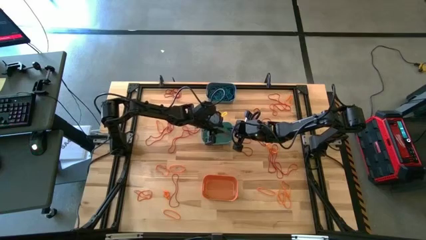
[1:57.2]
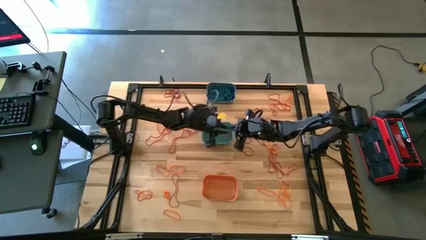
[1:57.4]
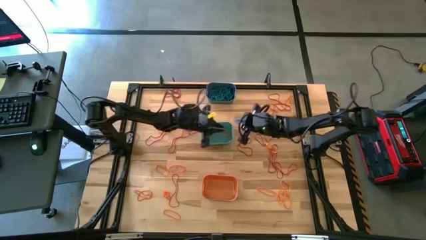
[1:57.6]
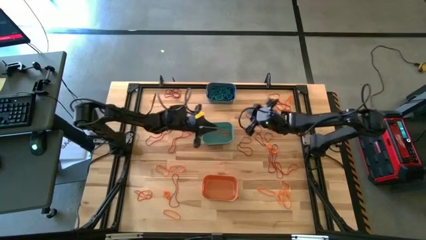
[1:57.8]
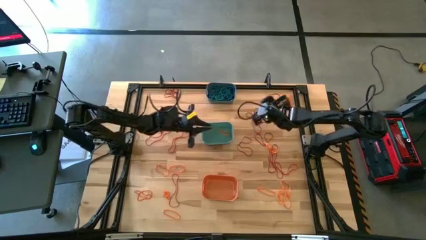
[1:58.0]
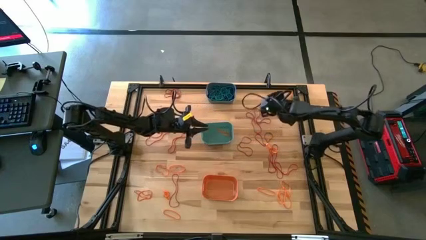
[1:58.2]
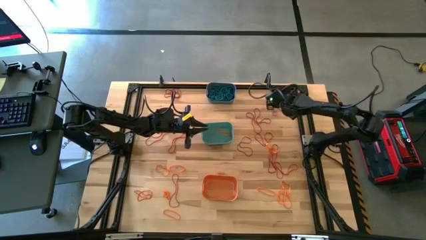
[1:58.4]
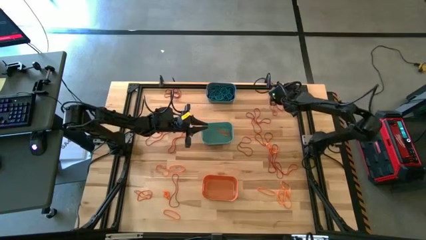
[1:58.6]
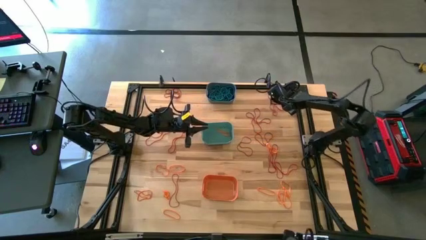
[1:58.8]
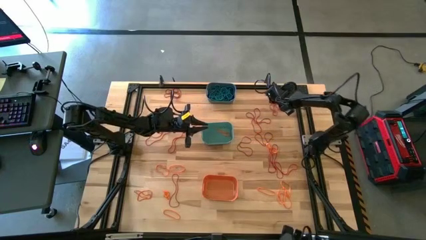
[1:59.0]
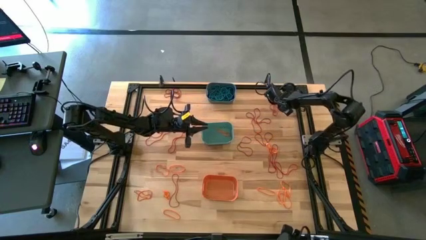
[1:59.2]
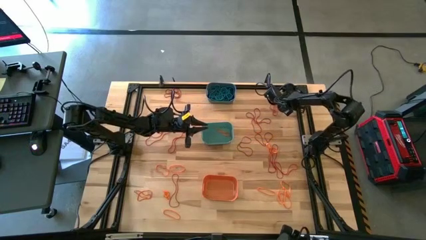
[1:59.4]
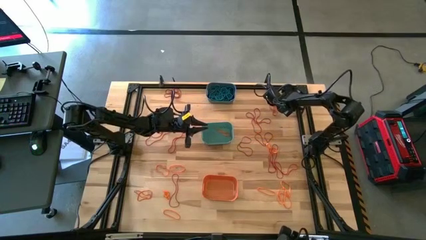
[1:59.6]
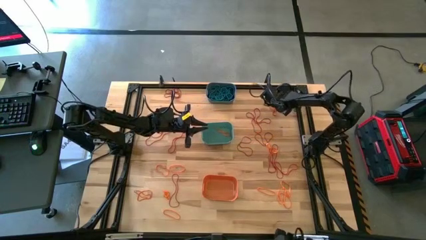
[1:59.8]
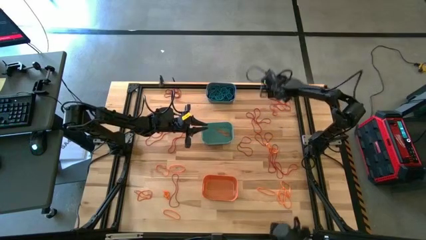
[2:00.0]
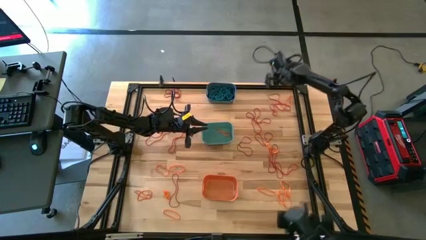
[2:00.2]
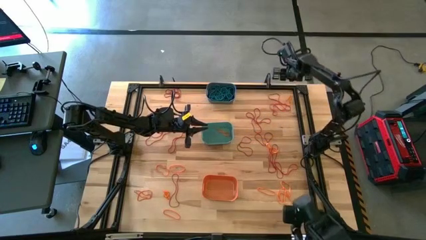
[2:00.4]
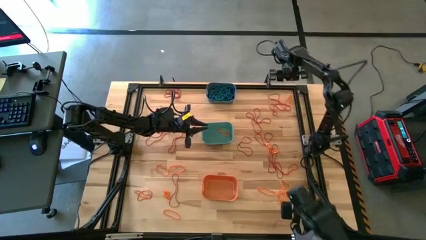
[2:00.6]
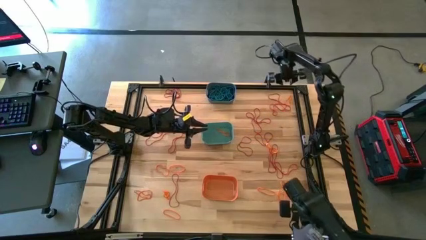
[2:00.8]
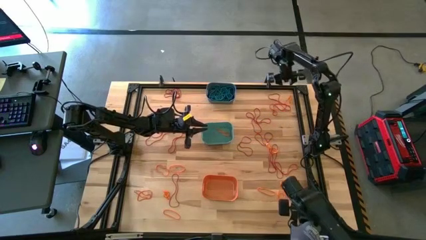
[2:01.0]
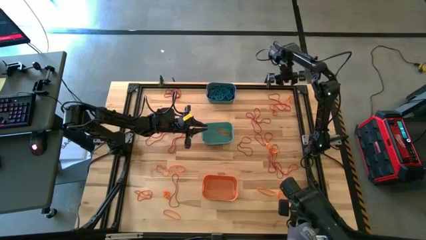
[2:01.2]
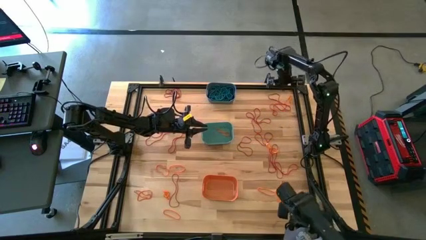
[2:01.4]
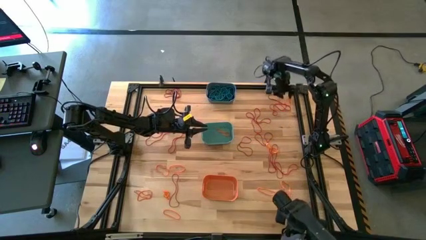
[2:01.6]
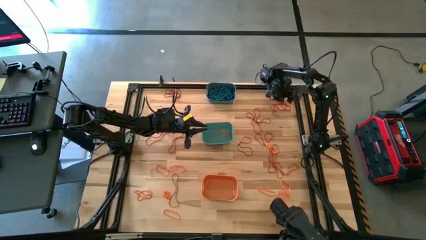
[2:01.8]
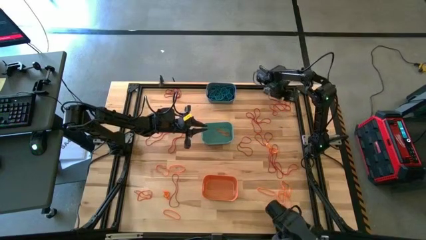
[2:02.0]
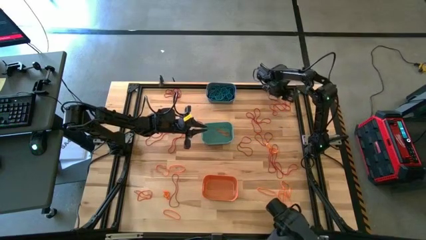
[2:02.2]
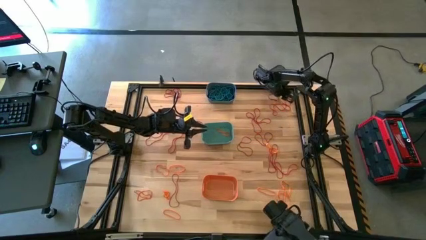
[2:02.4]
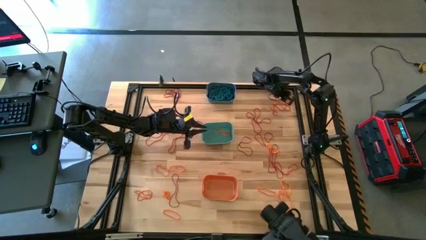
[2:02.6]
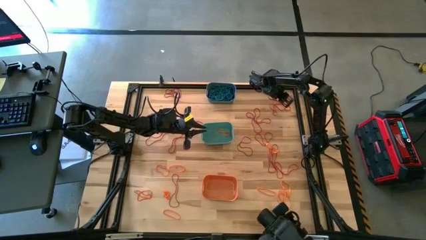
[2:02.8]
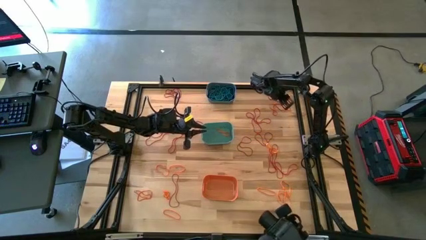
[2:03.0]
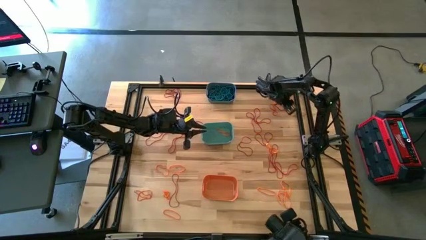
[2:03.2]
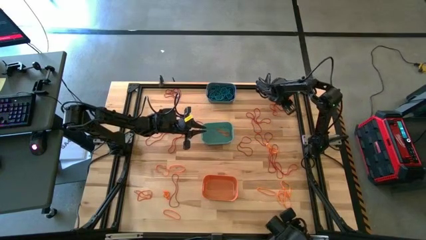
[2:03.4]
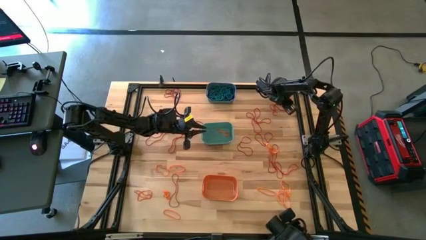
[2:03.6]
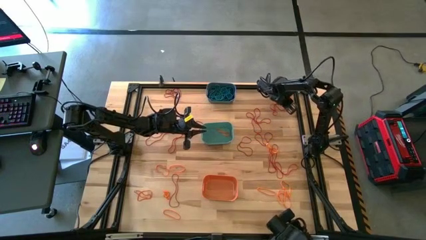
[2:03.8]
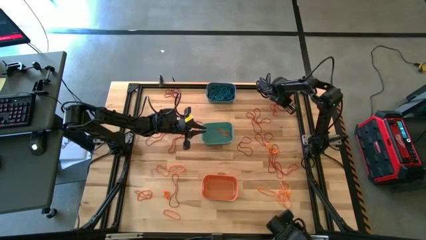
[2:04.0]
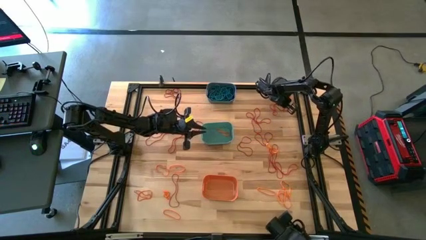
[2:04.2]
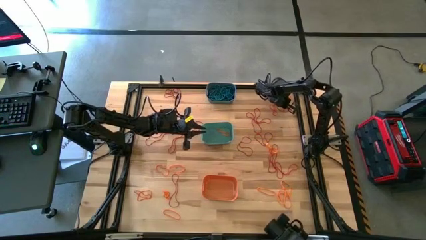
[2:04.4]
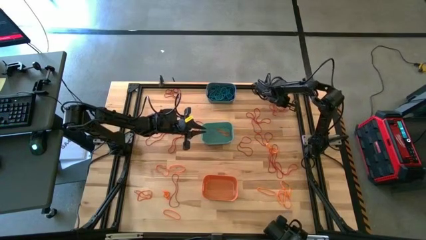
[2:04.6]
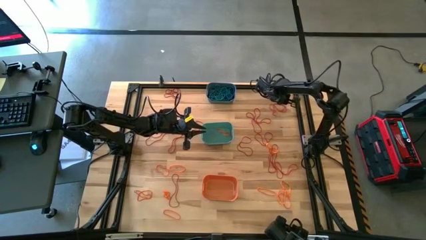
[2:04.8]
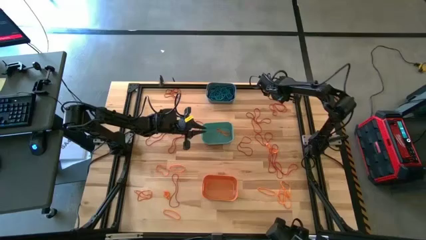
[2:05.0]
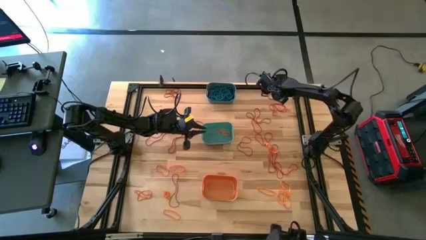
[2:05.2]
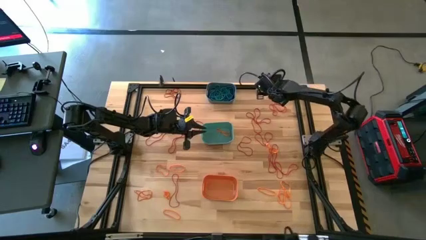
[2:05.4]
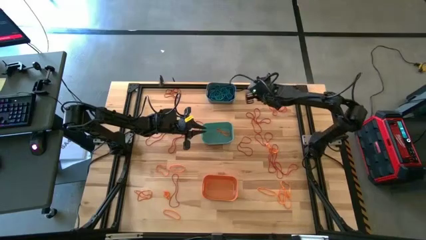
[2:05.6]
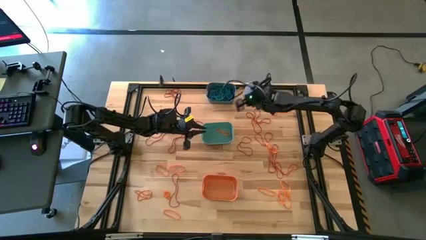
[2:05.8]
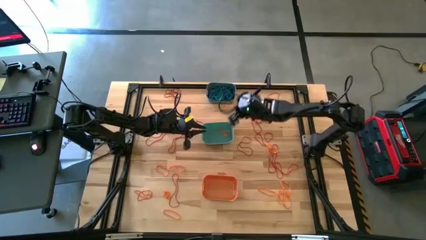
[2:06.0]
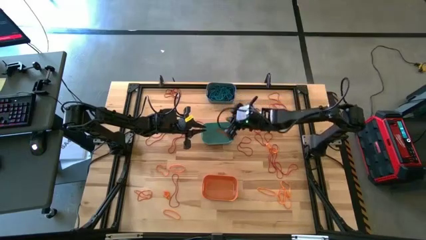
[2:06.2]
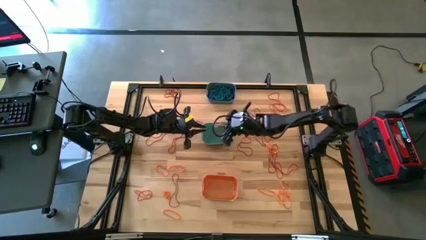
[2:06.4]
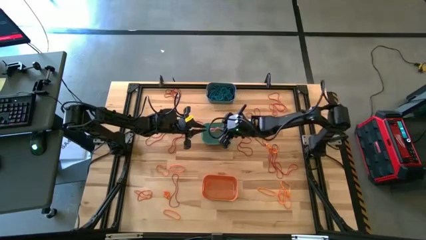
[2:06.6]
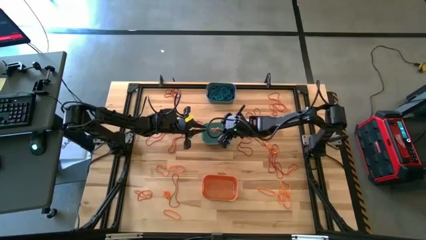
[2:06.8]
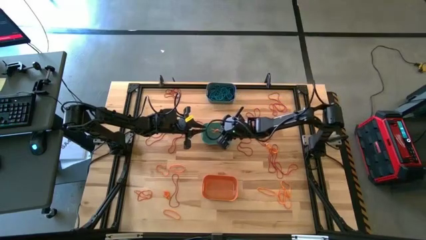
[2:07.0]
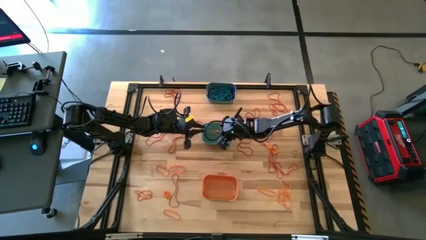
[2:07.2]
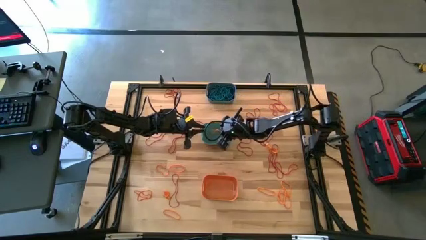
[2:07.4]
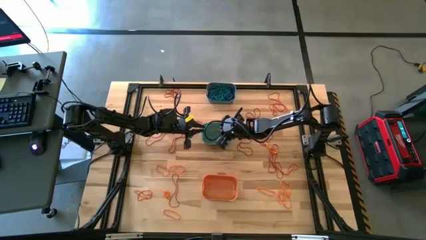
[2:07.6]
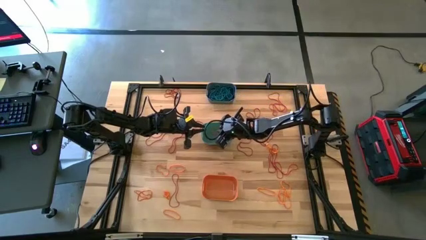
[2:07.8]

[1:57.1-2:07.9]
Task: Sort rubber bands into baskets
Put the orange rubber band into the green bin

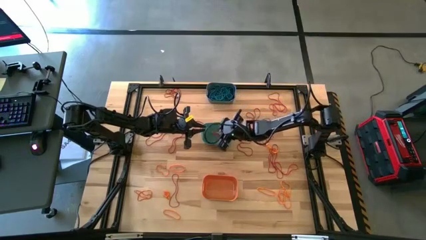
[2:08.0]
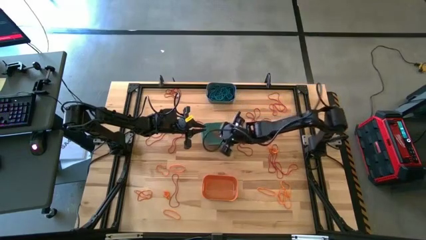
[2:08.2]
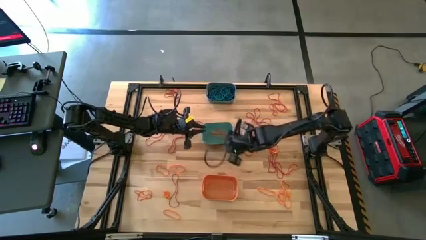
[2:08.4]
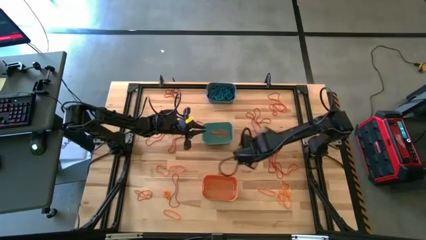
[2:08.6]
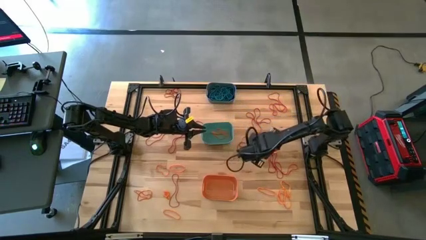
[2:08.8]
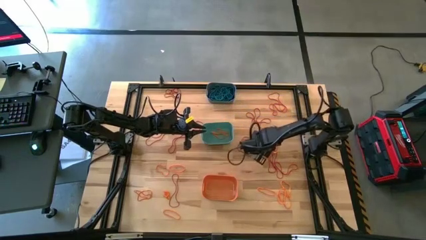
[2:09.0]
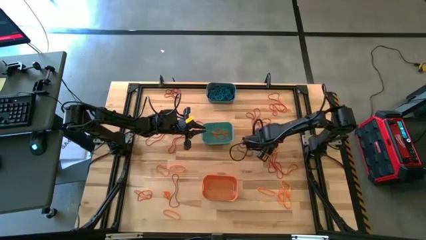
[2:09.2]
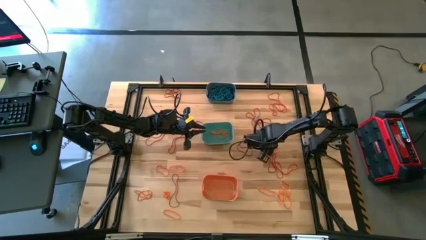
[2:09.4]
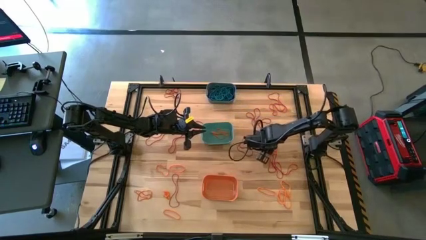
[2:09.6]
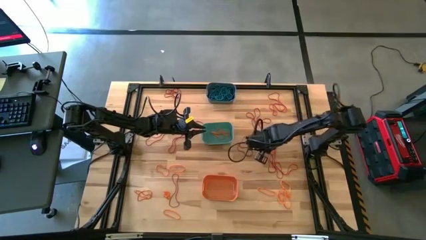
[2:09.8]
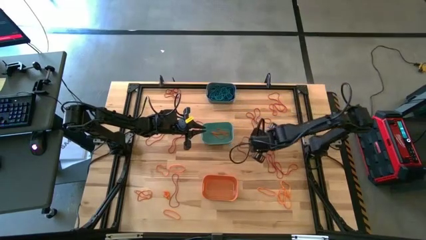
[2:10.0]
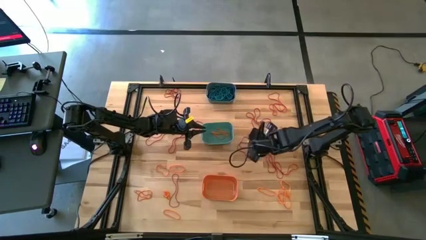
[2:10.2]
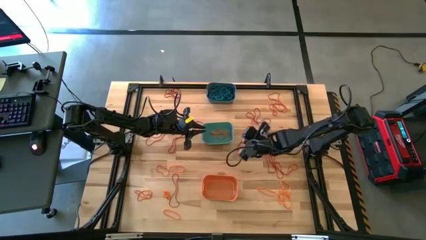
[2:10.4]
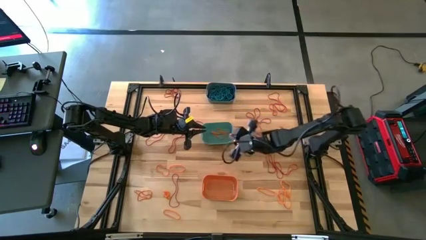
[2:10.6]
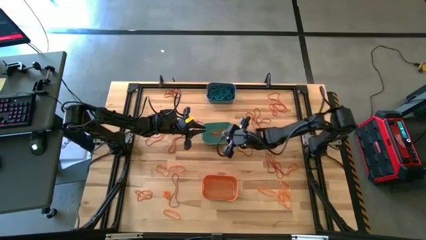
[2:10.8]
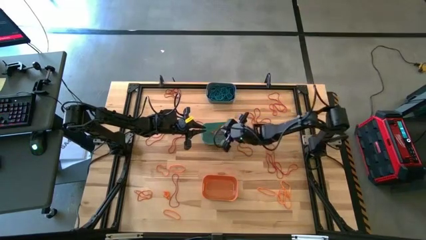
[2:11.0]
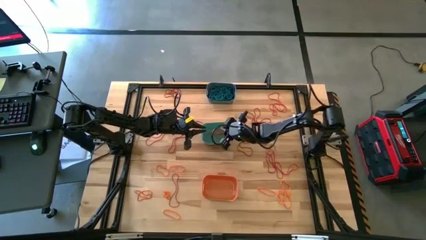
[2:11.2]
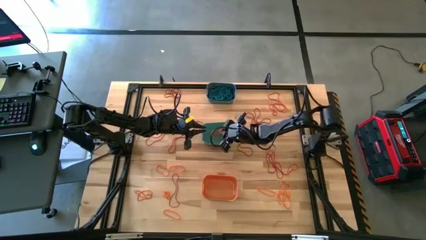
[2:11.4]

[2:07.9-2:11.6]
Put the orange rubber band into the green bin

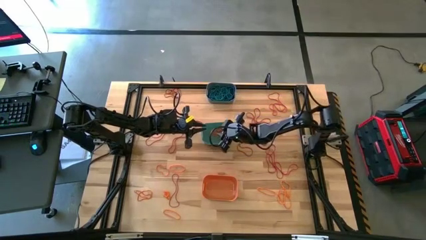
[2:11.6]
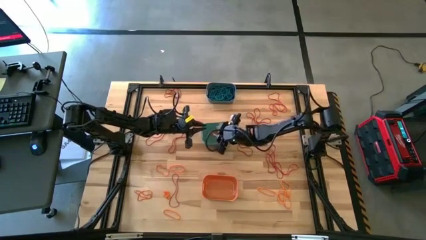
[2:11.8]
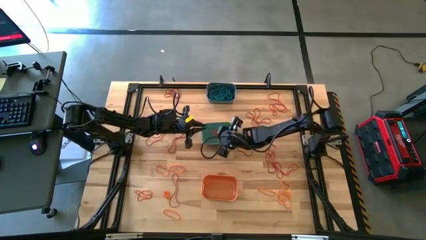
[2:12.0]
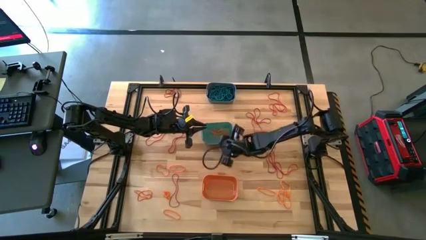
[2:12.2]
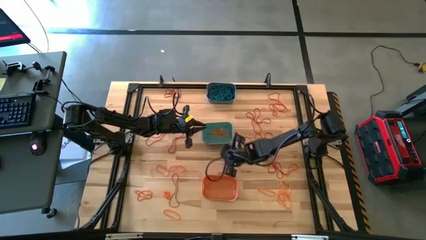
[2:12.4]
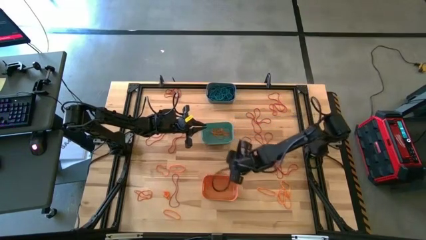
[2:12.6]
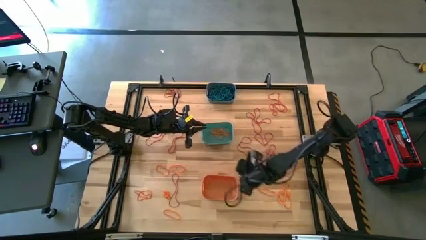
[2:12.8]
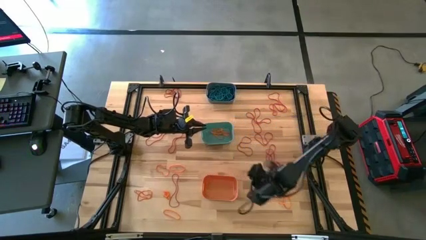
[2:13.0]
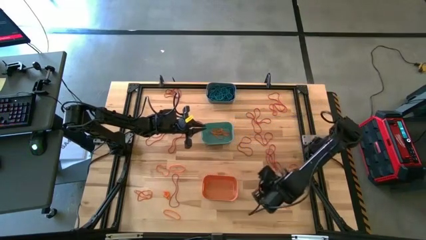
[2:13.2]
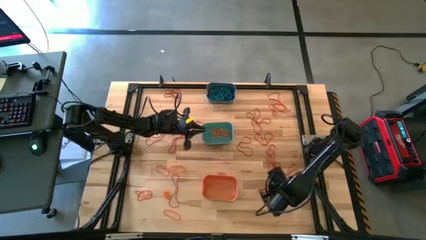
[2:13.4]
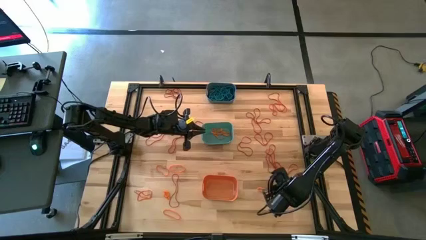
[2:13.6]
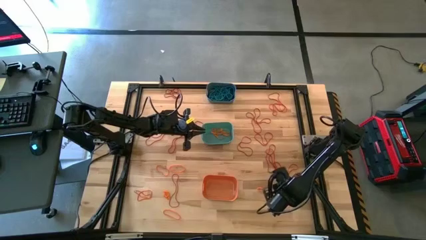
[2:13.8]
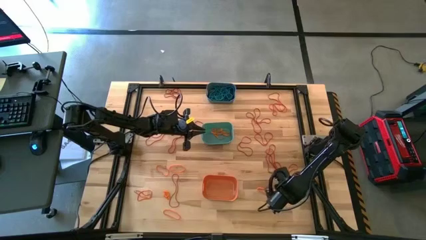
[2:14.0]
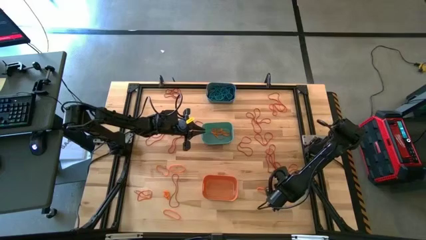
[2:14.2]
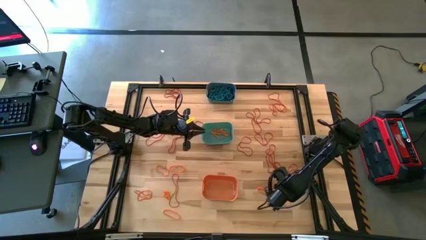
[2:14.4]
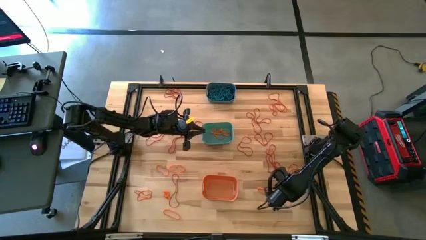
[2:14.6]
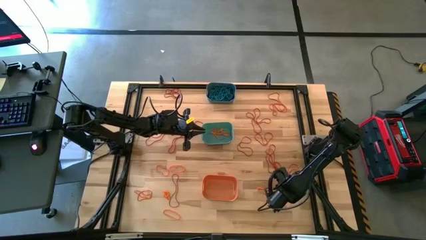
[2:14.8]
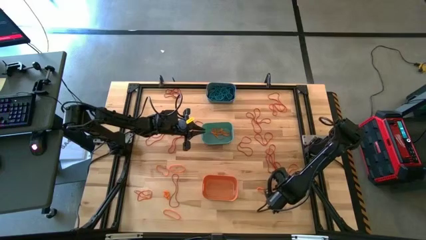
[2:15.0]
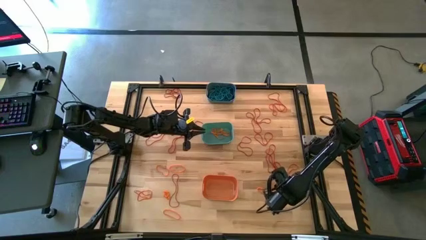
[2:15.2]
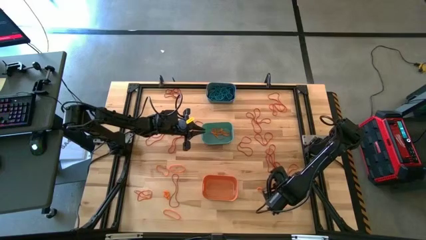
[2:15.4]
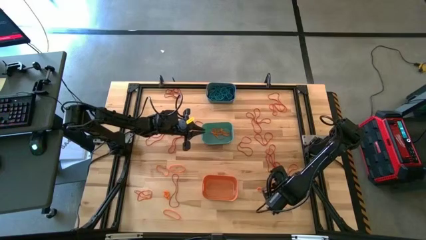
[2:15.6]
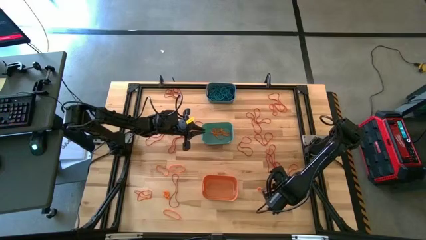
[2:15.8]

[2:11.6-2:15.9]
Put the orange rubber band into the green bin
